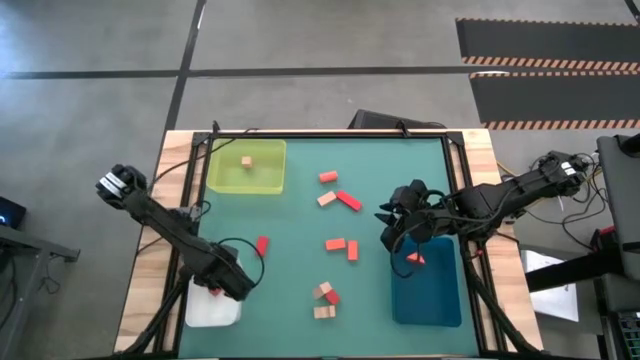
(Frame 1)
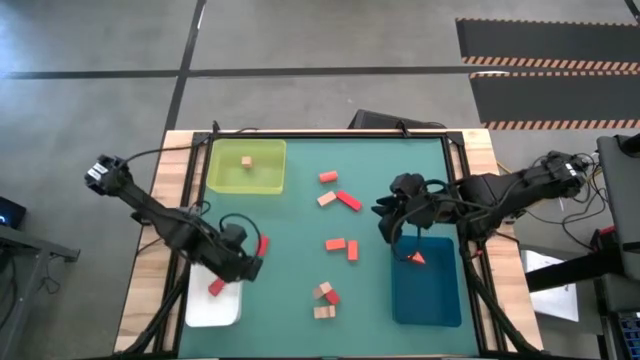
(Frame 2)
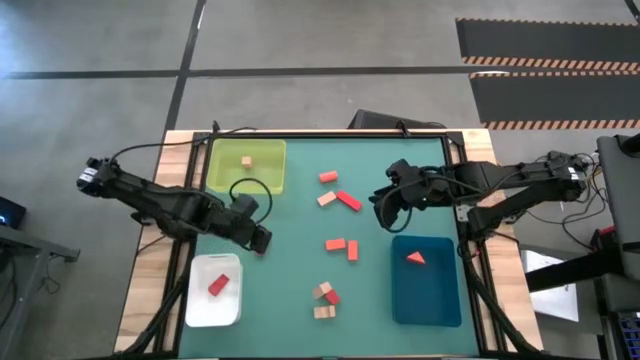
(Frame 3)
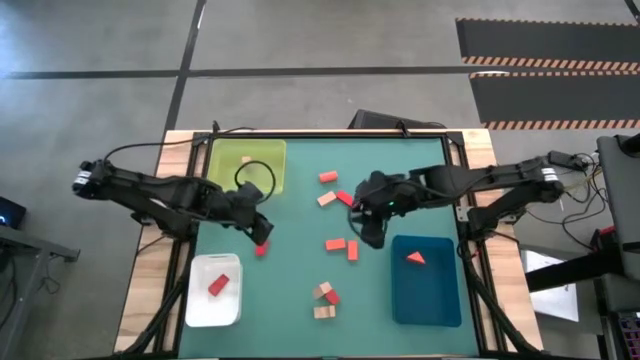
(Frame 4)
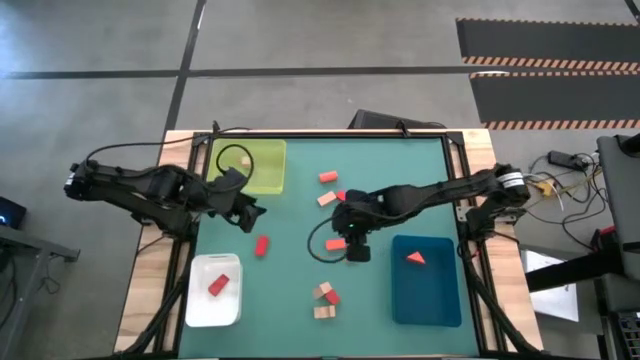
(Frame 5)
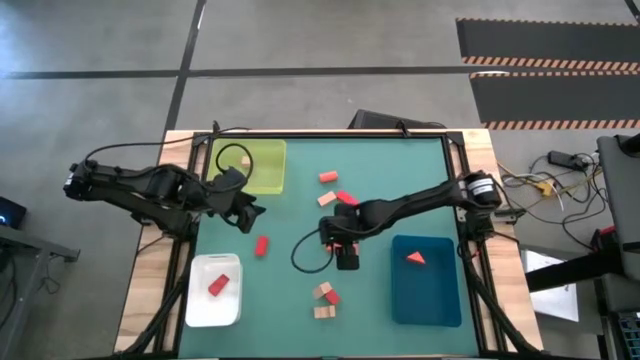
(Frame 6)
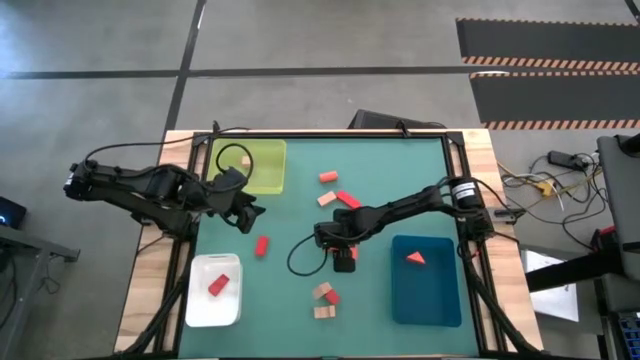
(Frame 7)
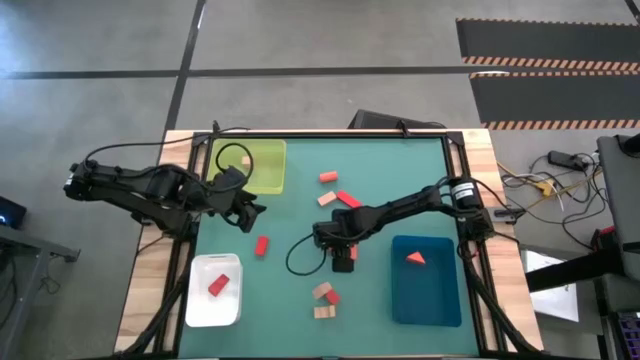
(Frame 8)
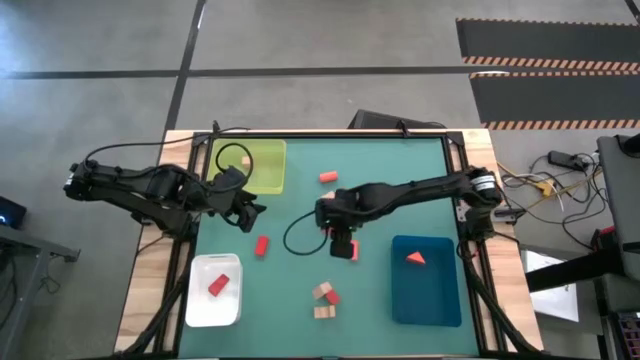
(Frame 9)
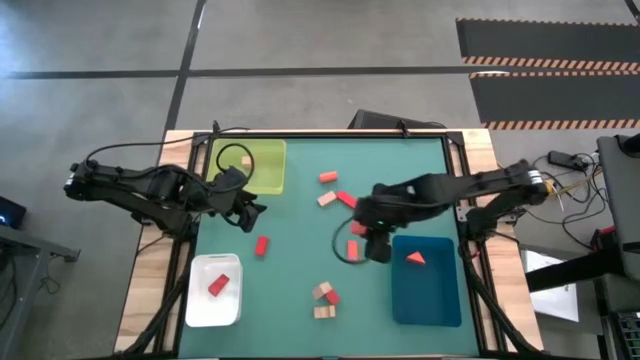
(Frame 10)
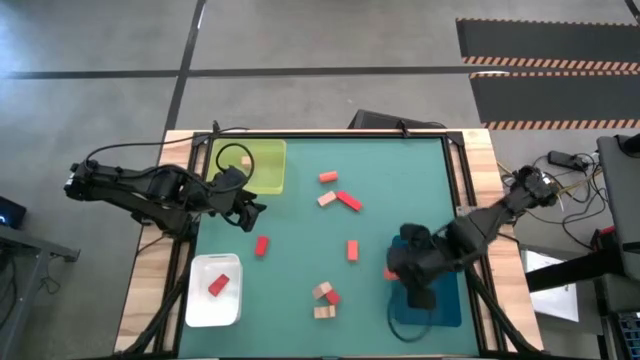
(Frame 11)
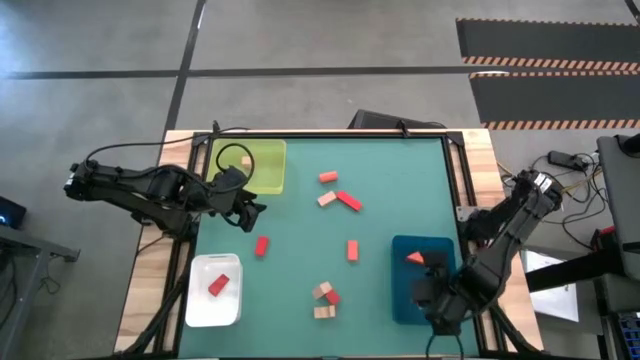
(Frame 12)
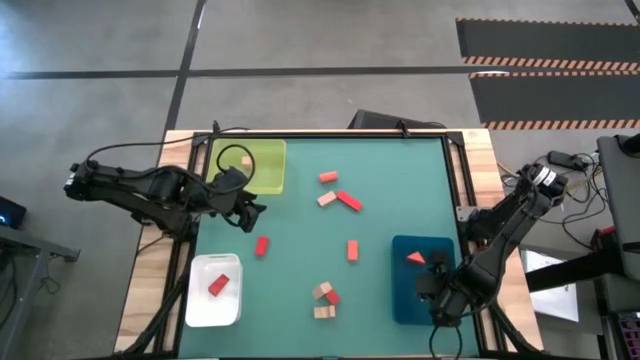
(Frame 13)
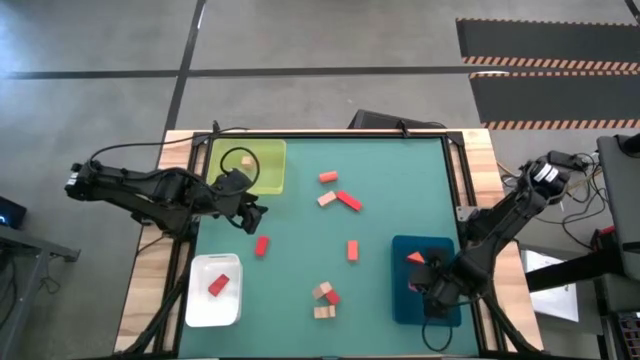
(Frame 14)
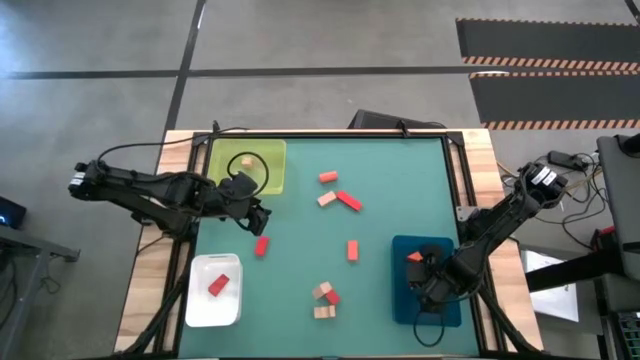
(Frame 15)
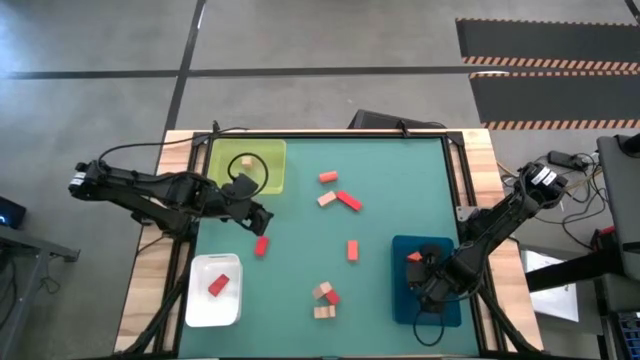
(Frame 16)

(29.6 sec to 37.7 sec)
Task: Sort & place blocks by color
Put the orange block into the white bin

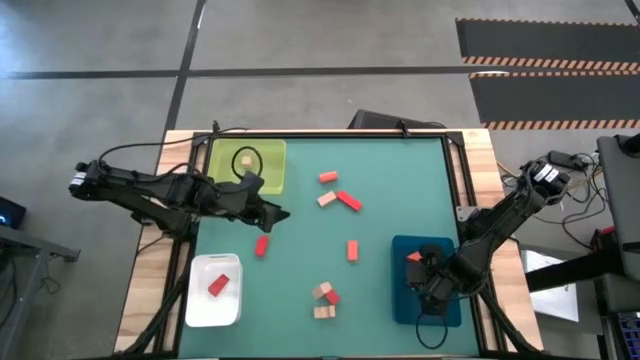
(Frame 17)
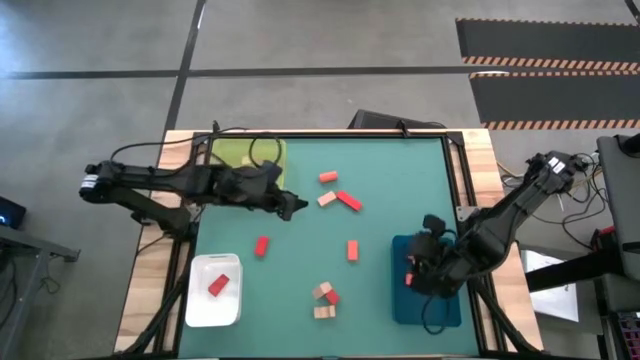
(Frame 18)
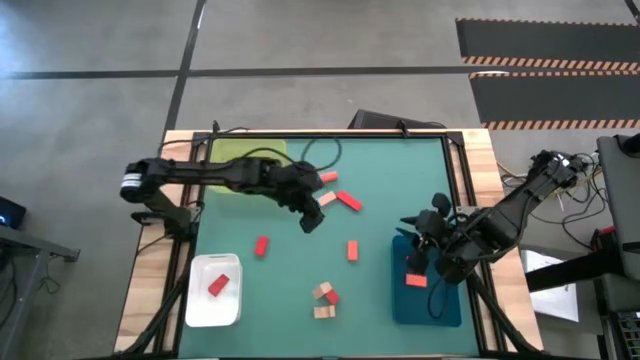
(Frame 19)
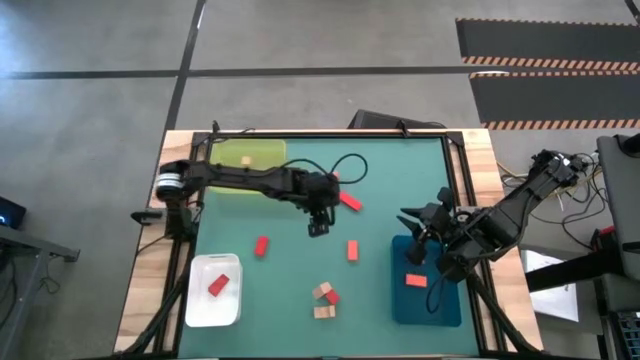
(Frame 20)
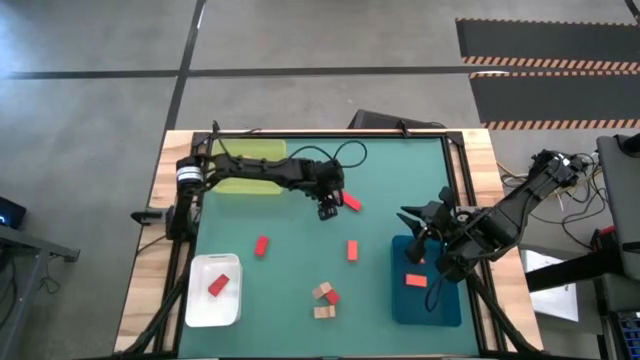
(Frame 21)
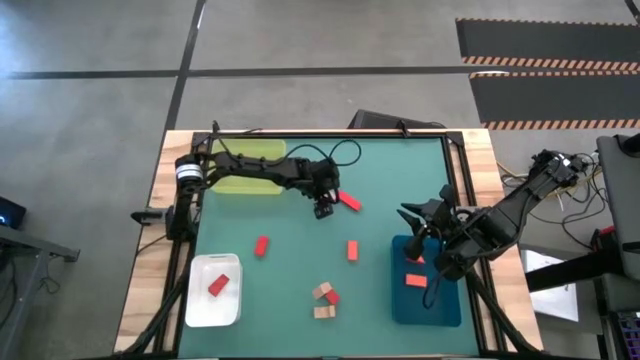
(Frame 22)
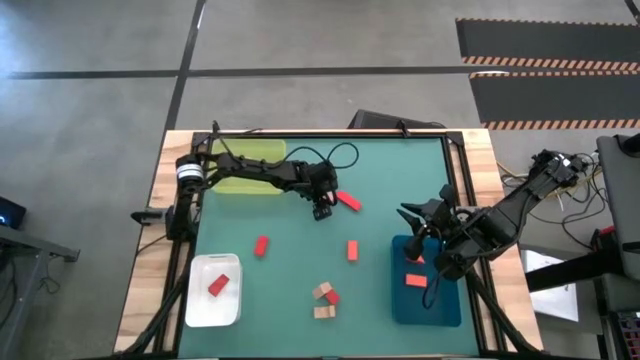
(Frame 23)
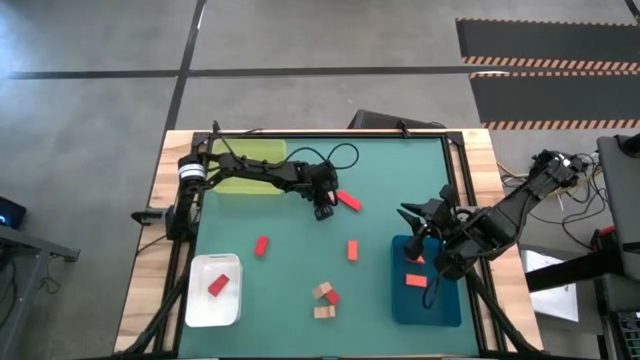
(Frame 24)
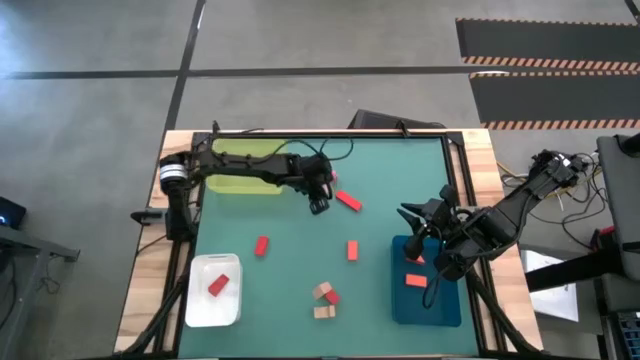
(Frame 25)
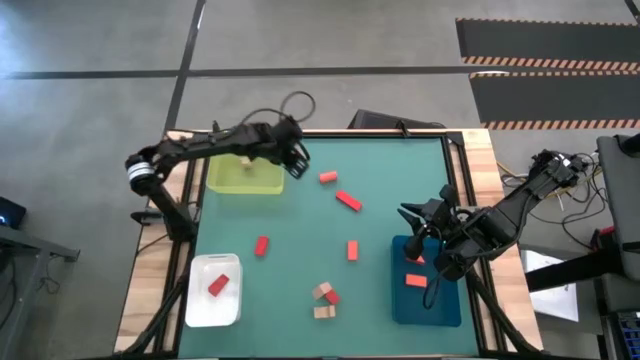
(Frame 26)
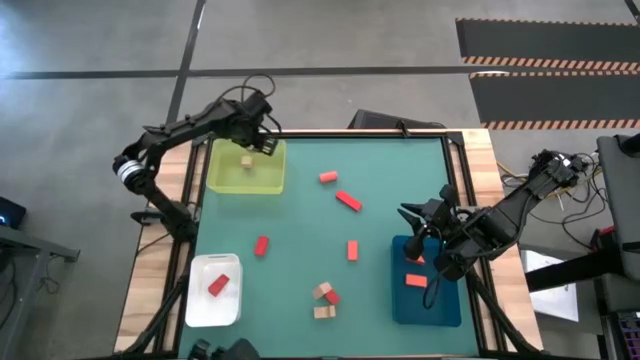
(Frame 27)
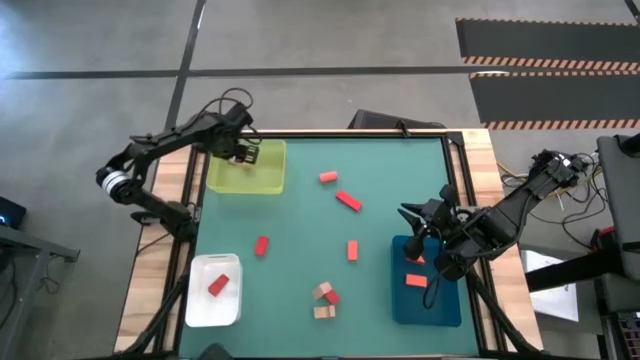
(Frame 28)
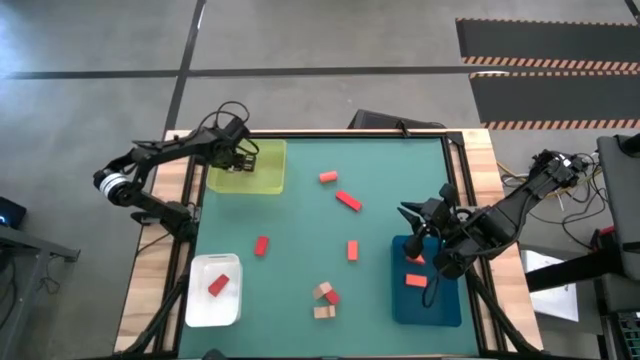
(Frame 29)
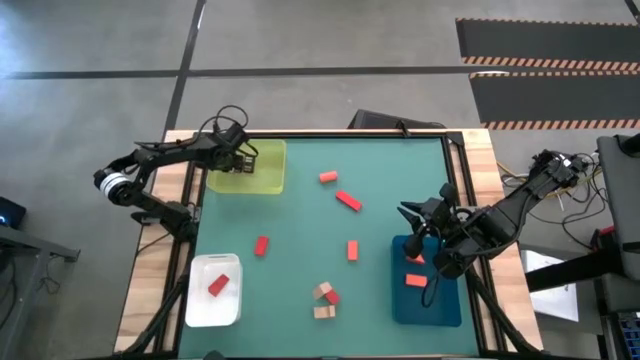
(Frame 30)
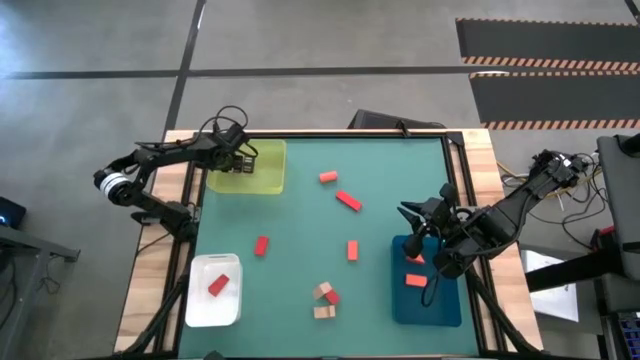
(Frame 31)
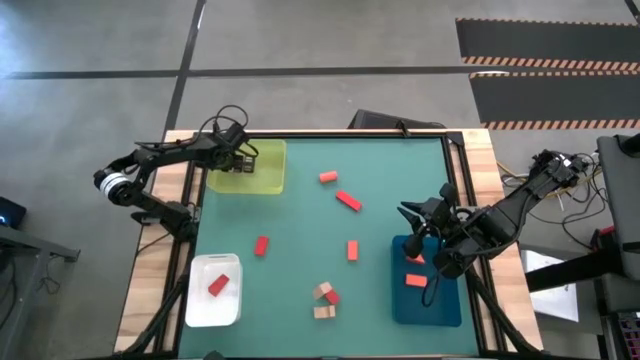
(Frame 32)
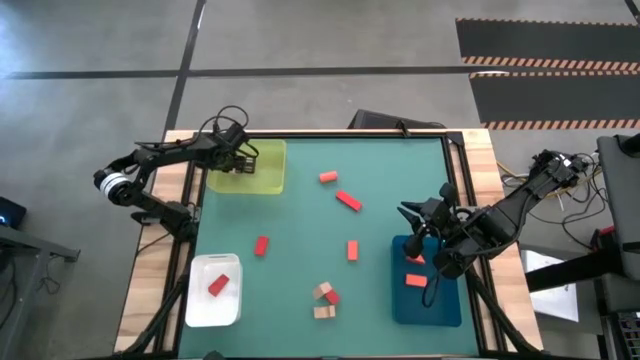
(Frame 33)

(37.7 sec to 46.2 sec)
Put the light brown block into the yellow bin

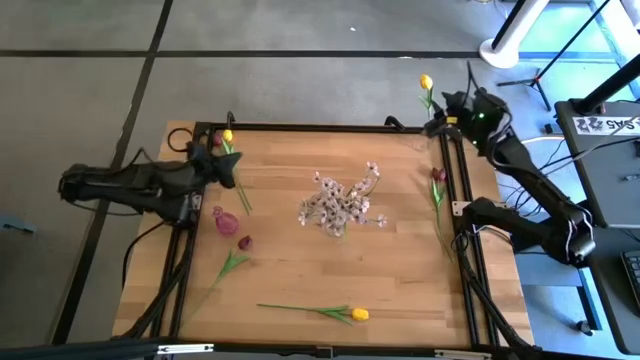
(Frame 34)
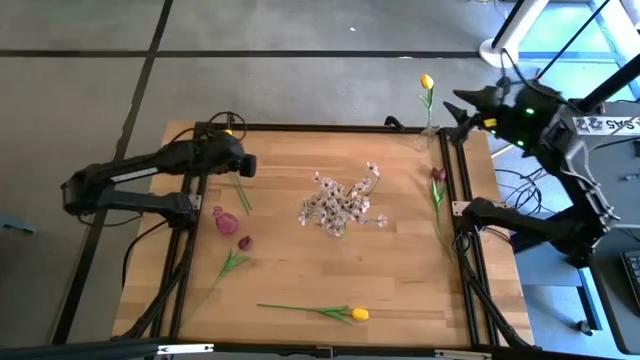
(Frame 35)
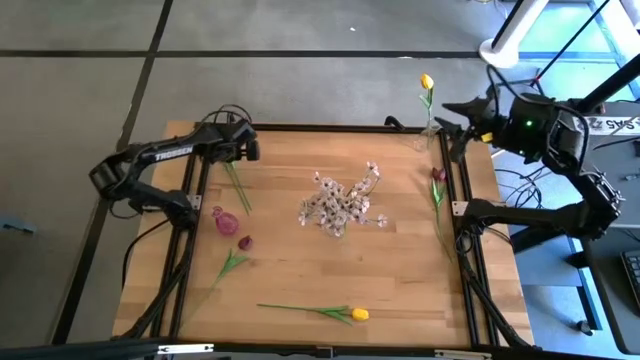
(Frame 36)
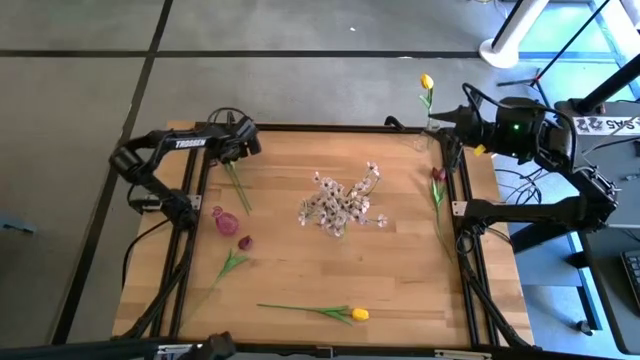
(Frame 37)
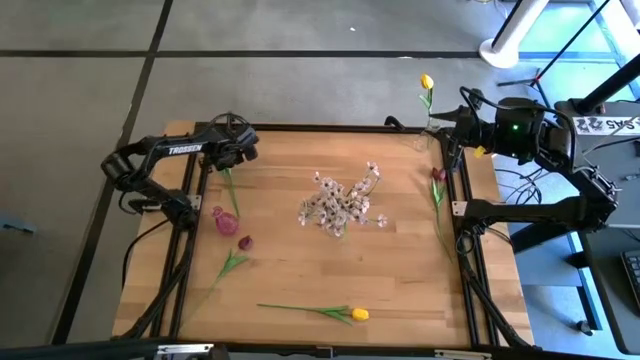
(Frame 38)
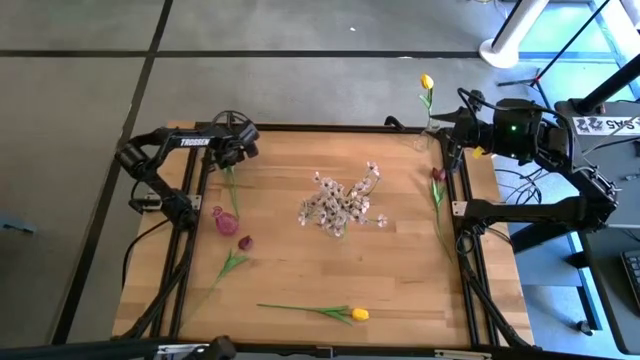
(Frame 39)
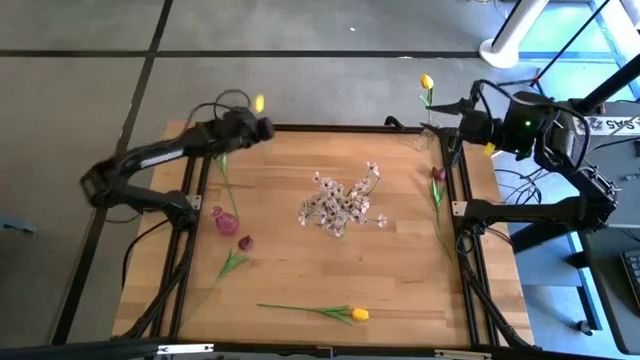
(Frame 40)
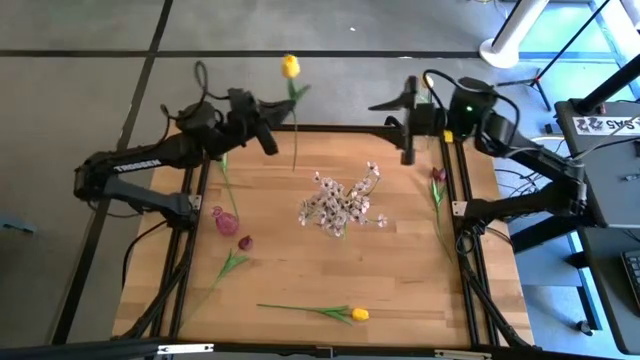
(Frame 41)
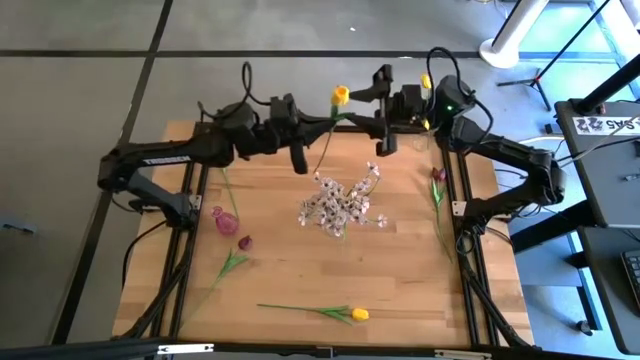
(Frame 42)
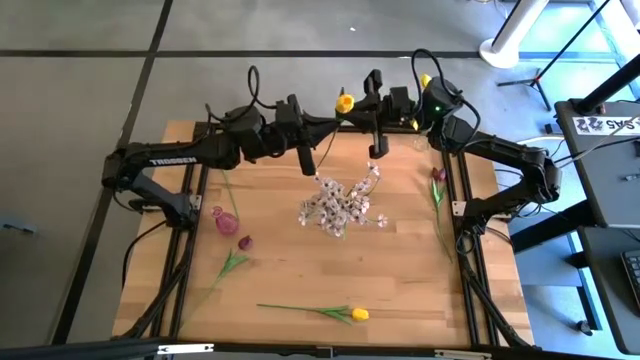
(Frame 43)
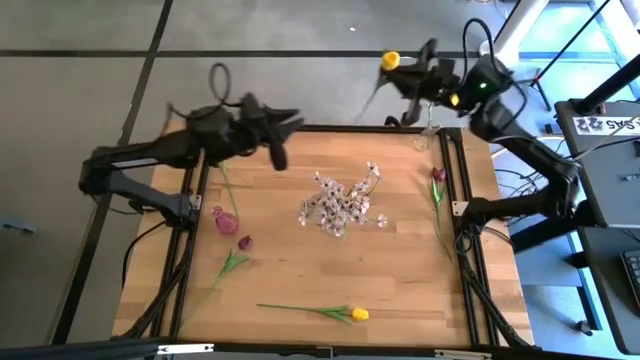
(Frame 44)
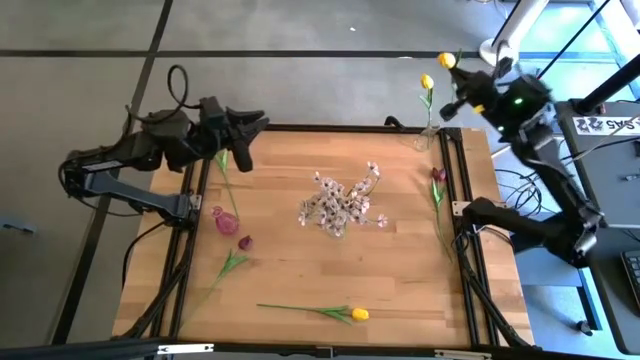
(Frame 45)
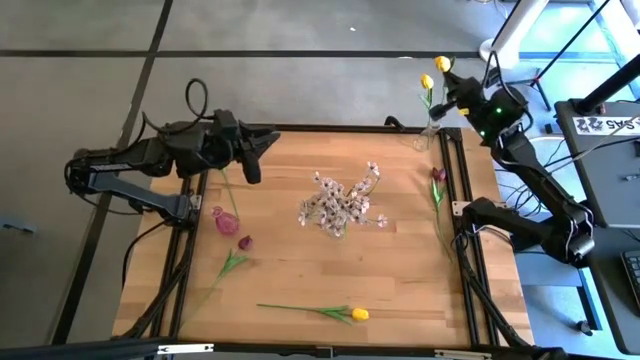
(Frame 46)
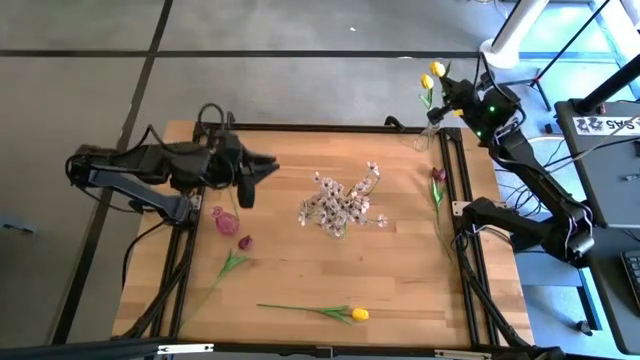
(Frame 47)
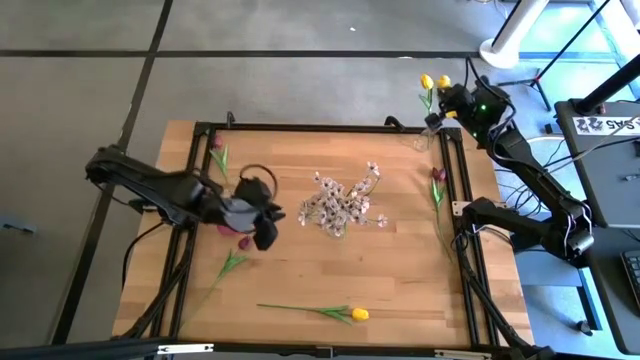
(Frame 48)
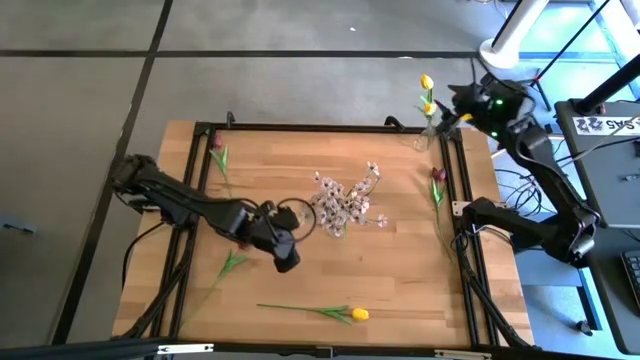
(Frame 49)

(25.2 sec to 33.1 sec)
Task: Sort flowers into vase by color
Put the top yellow tulip into the top transparent vase
